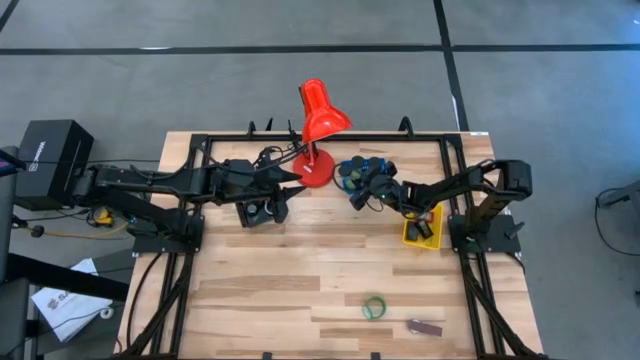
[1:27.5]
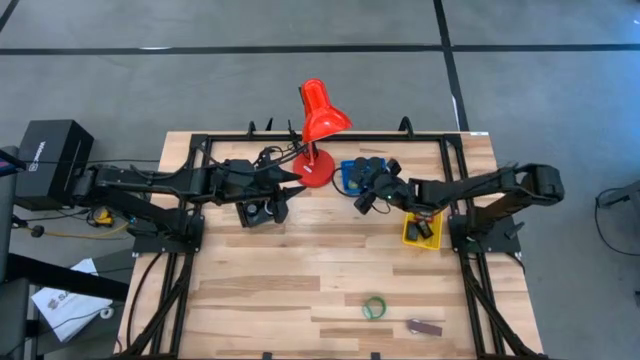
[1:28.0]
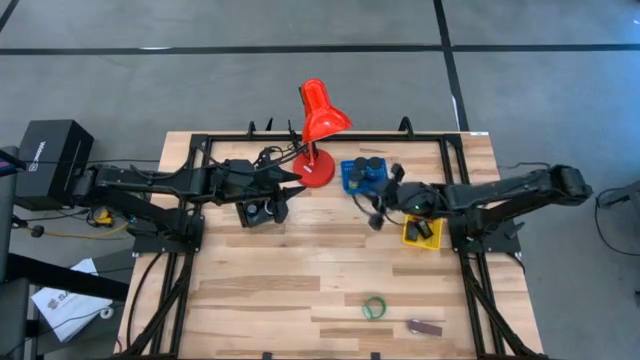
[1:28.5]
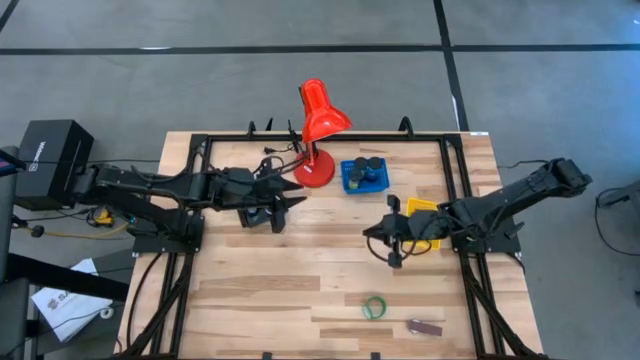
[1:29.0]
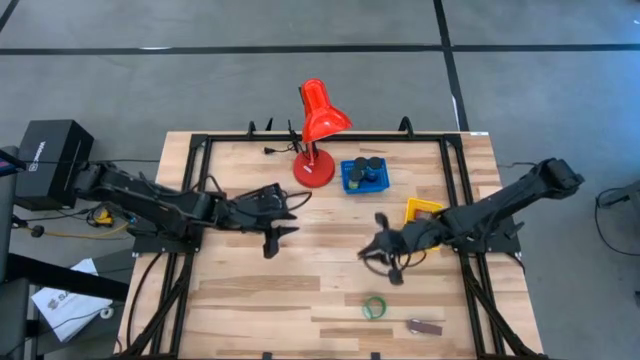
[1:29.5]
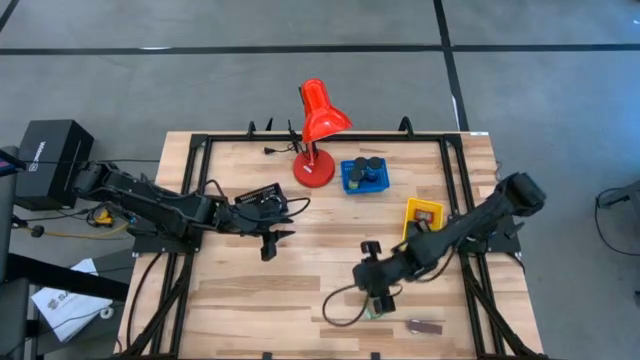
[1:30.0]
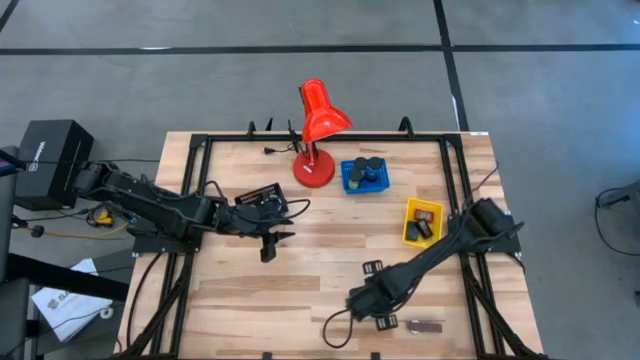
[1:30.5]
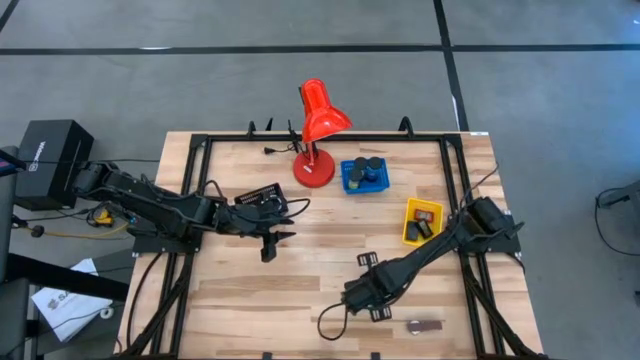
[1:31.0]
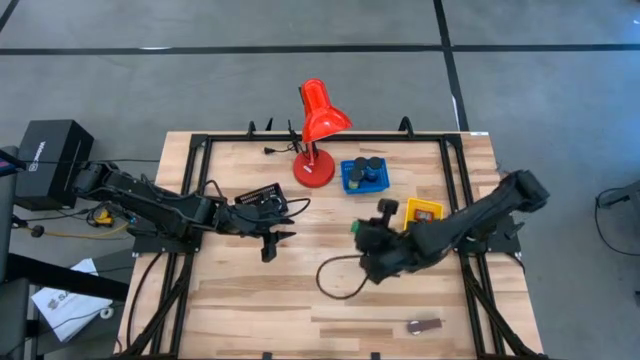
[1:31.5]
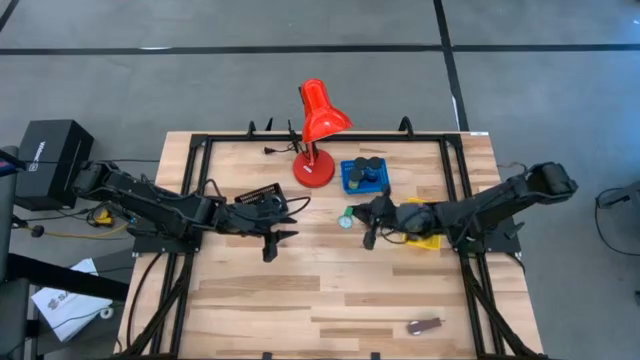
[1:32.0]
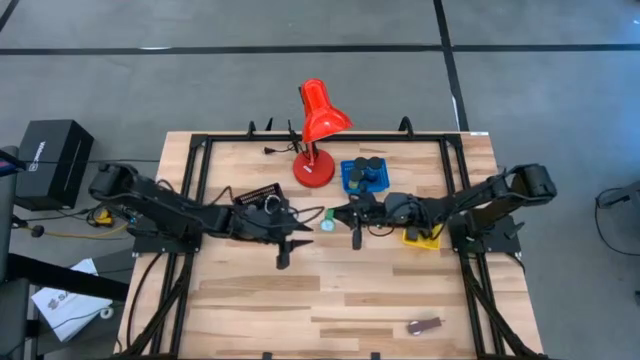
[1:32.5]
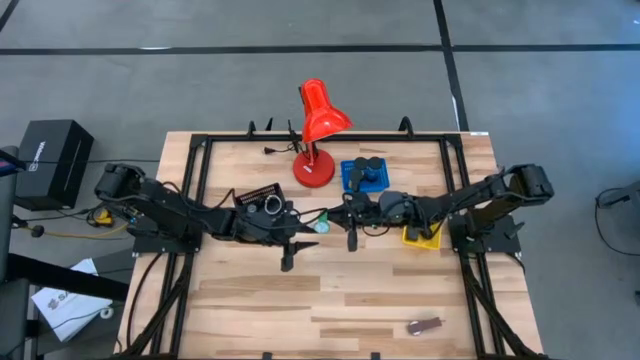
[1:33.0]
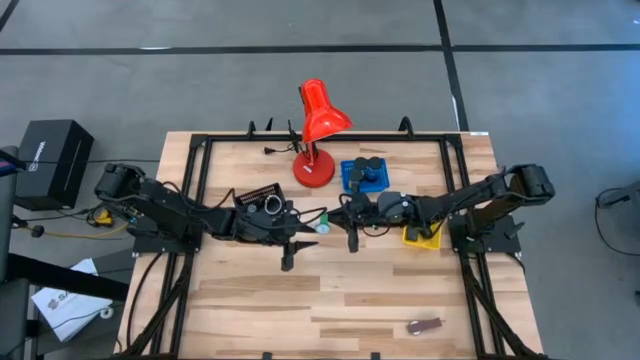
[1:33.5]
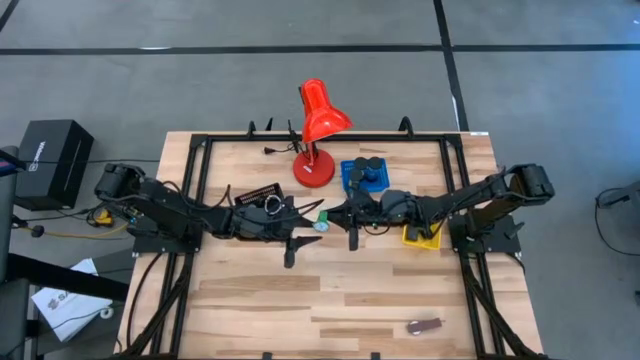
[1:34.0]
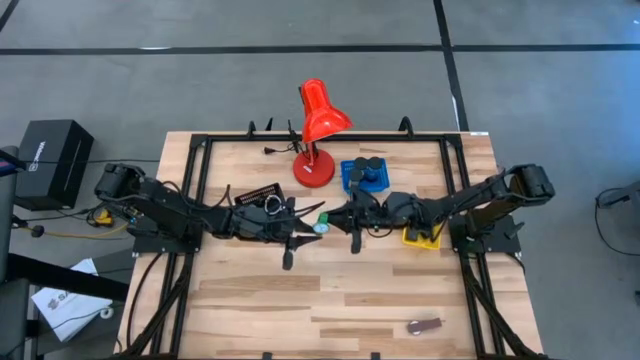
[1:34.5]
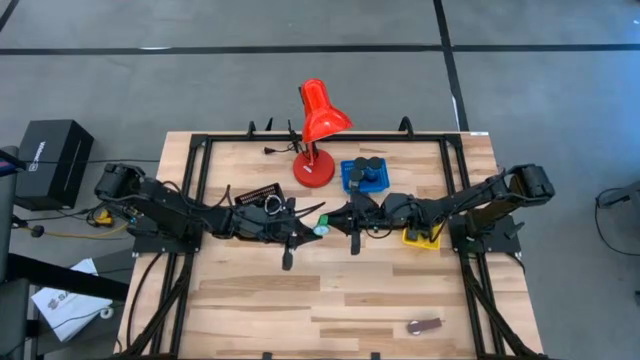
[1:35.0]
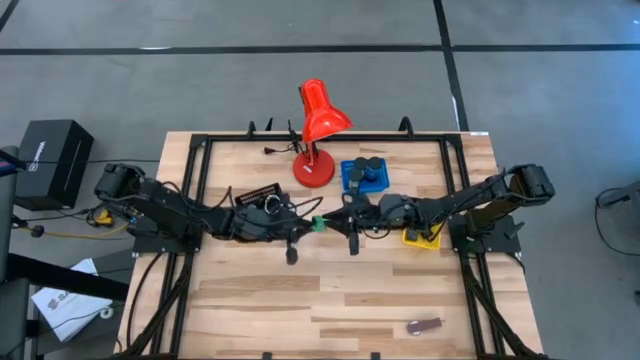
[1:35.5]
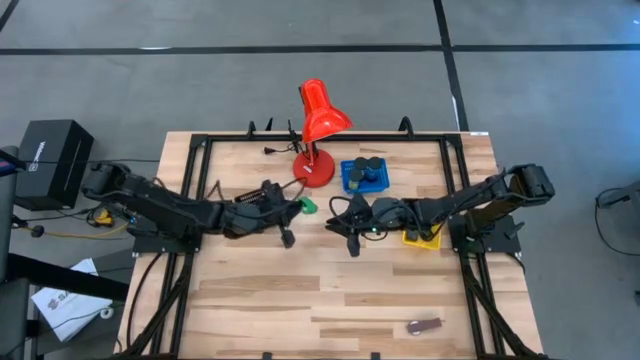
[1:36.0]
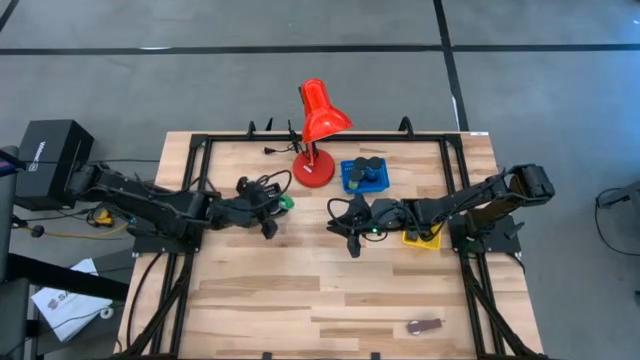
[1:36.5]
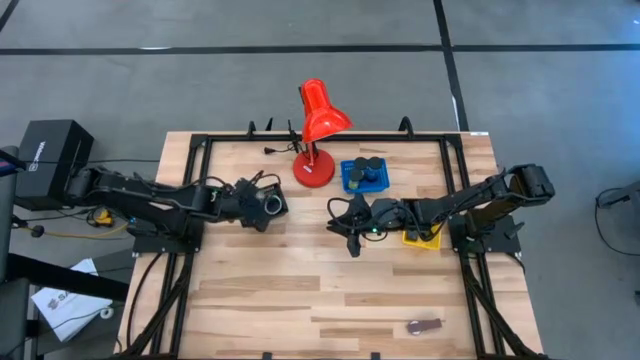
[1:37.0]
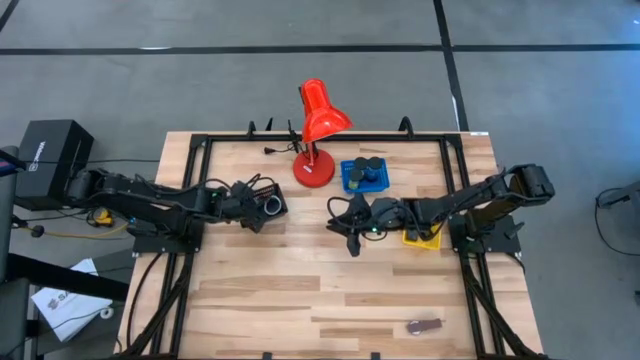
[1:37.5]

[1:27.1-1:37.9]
Task: Pick & Place Office items
Put the green wristwatch into the black basket

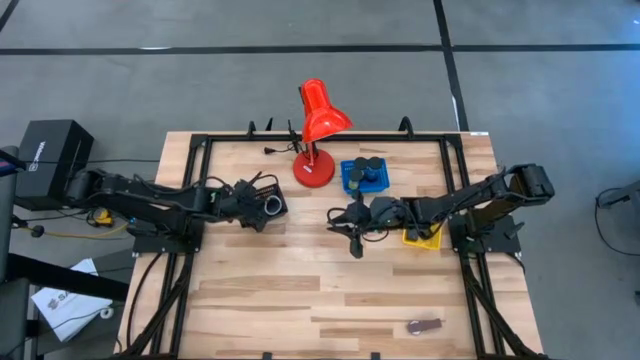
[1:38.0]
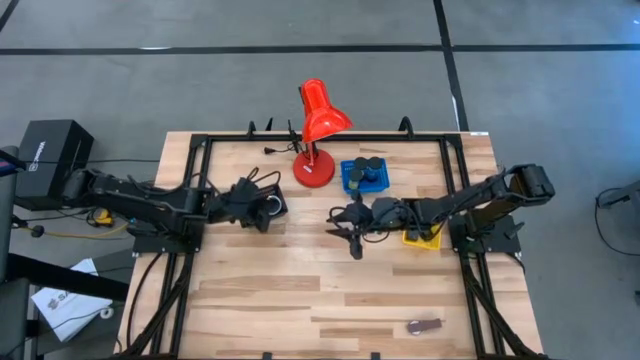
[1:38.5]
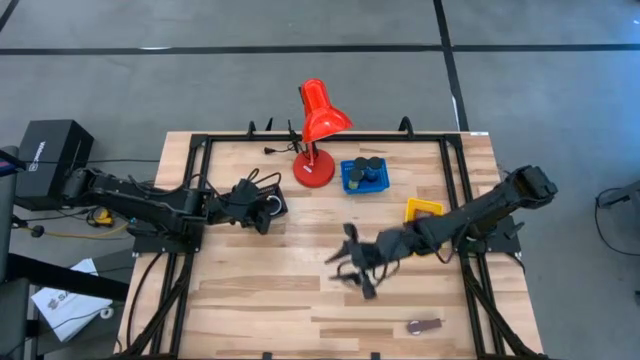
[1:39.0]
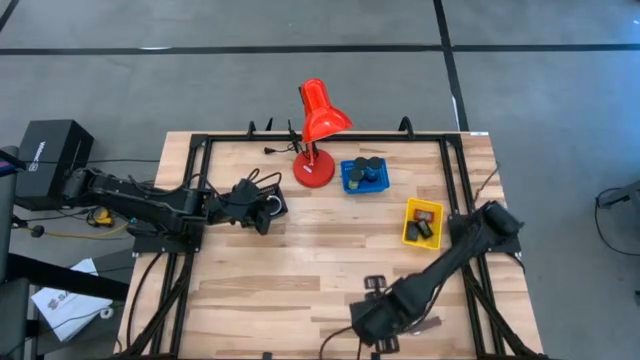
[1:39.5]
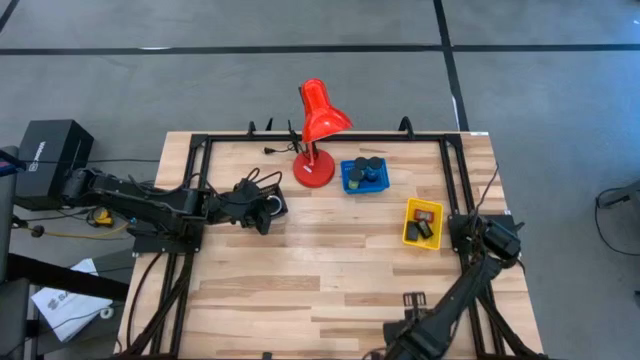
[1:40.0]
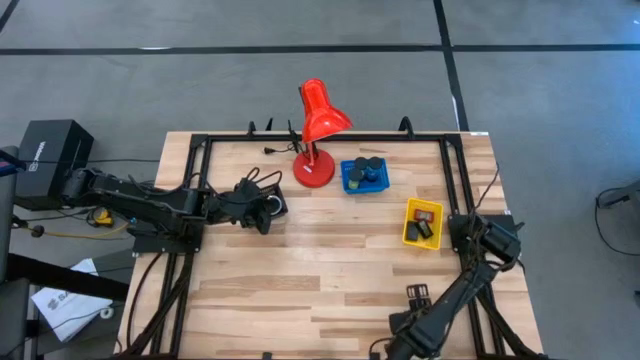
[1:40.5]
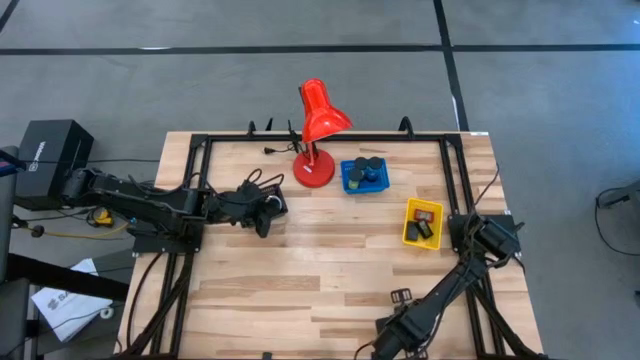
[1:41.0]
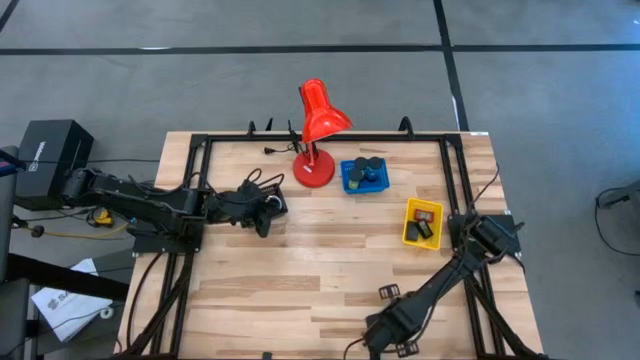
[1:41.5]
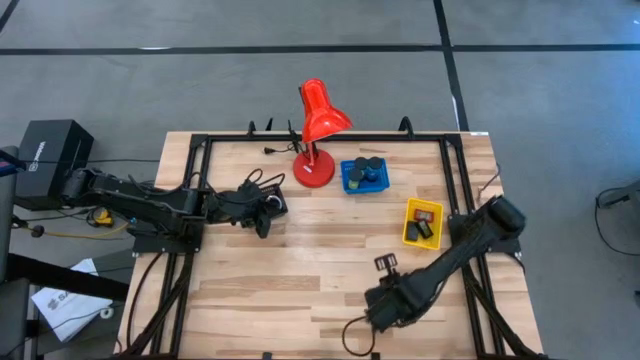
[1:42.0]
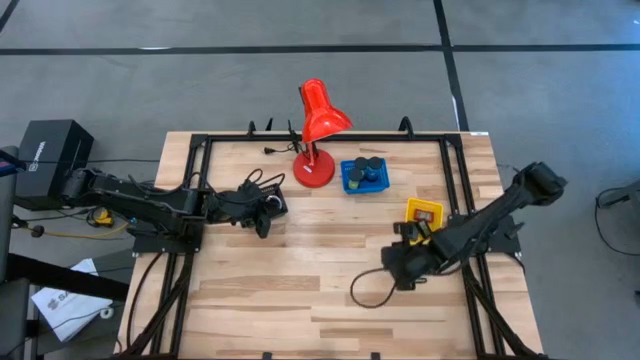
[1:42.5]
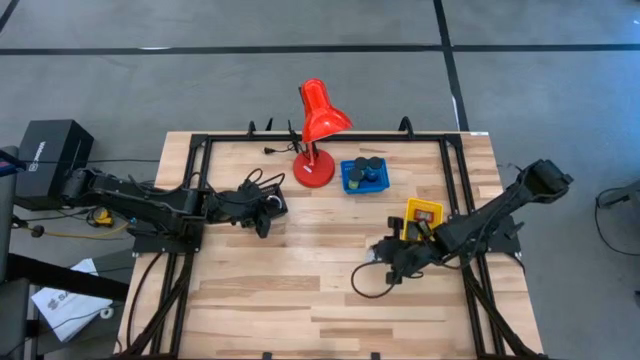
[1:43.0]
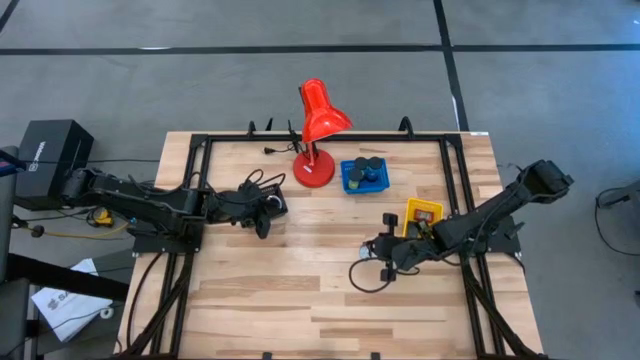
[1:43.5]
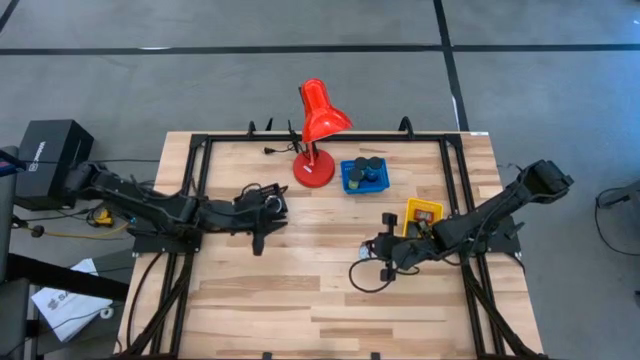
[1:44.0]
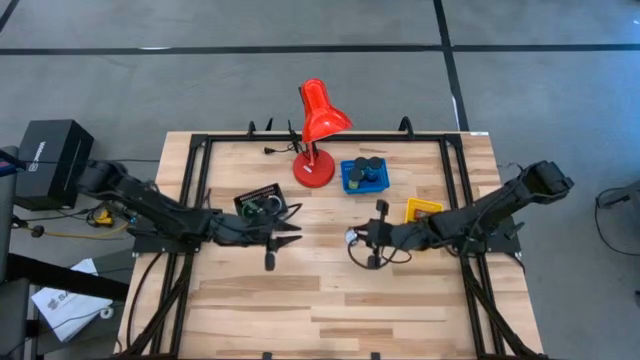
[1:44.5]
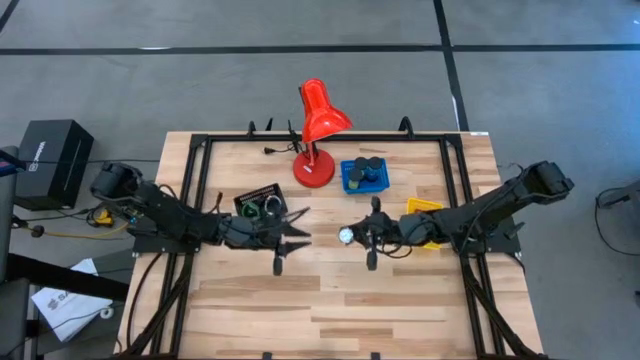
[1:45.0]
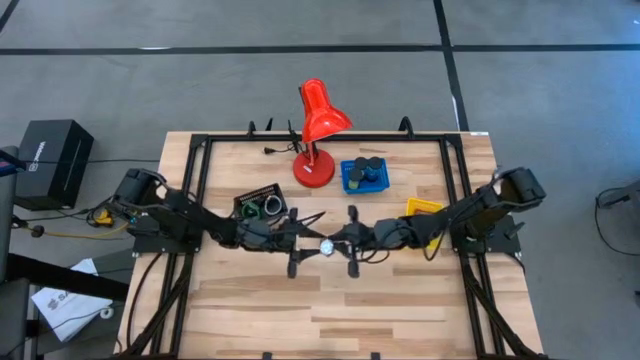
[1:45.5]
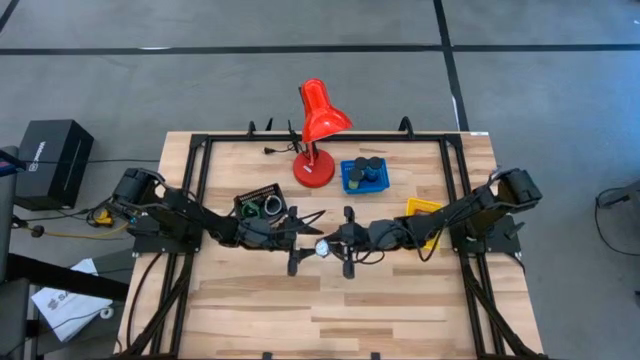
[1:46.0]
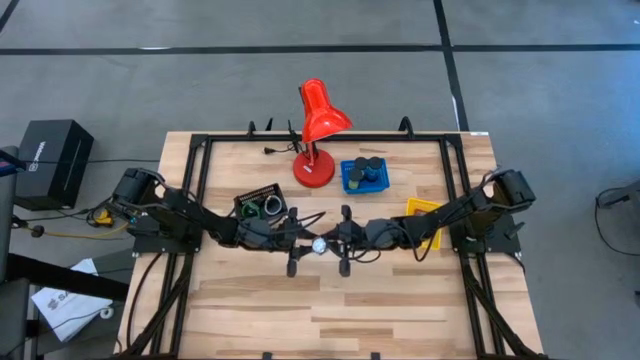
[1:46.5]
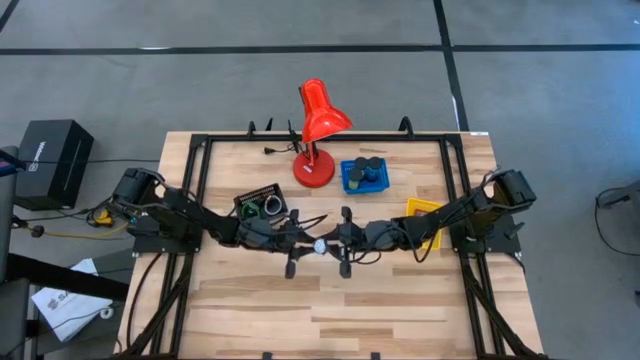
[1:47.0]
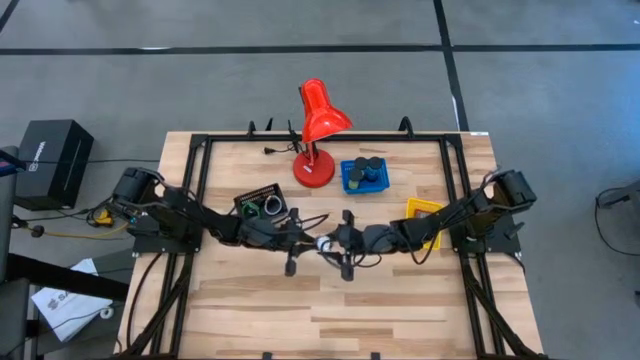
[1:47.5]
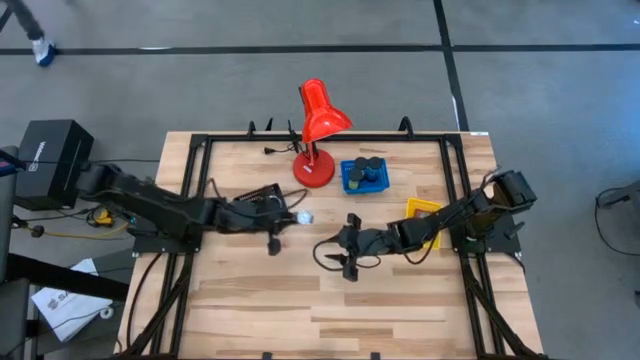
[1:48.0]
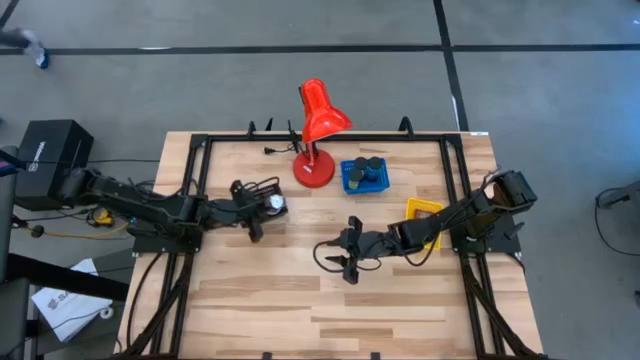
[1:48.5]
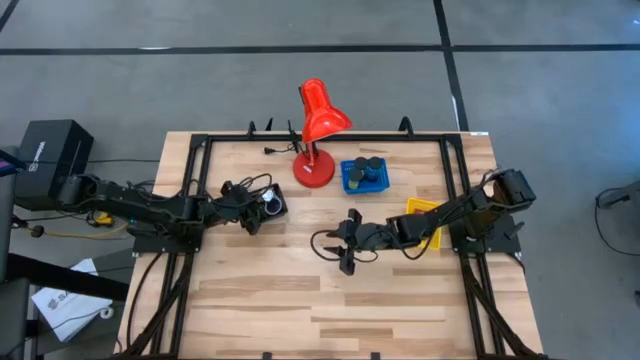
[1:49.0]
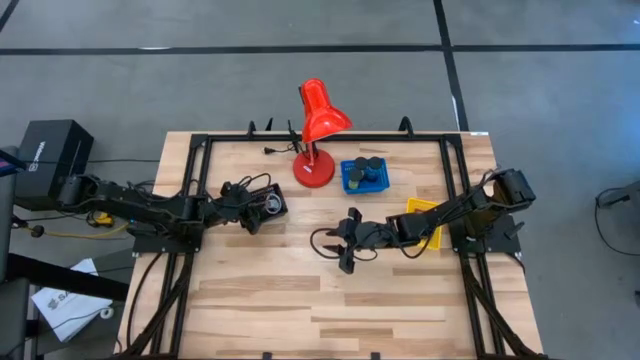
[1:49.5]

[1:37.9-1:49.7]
Put the brown wristwatch into the black basket
